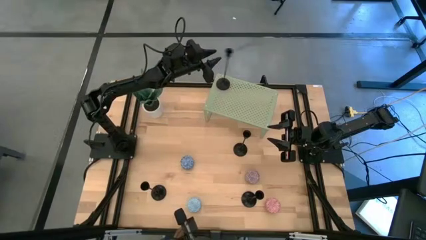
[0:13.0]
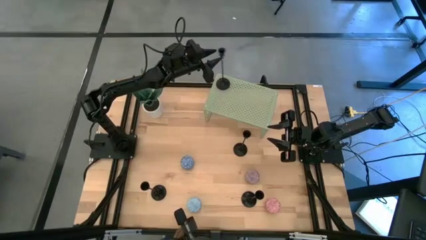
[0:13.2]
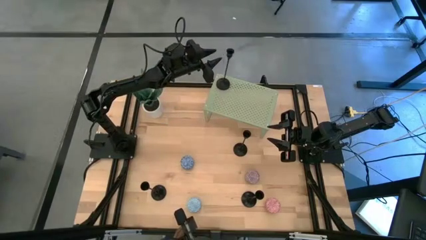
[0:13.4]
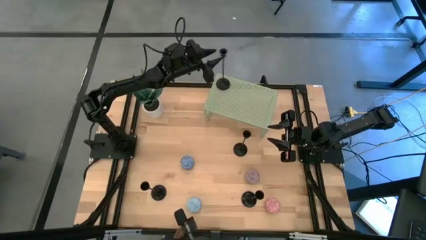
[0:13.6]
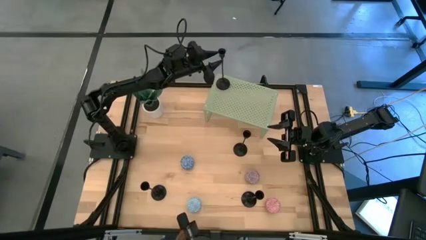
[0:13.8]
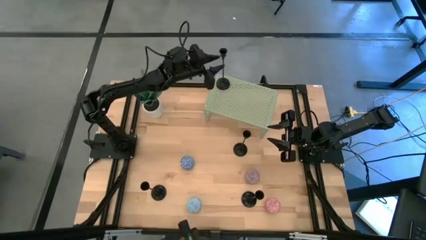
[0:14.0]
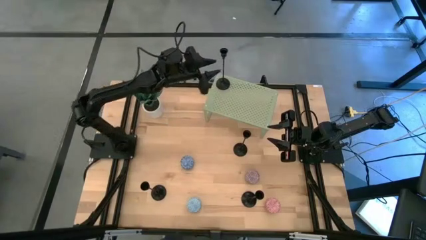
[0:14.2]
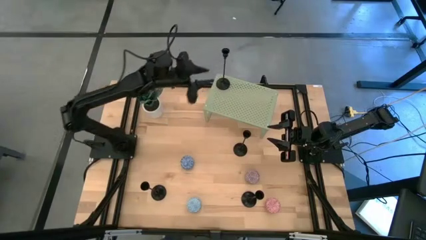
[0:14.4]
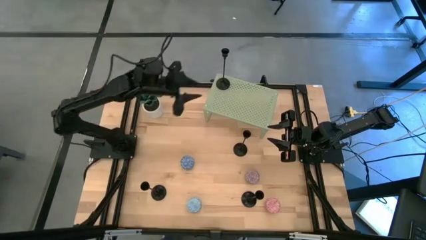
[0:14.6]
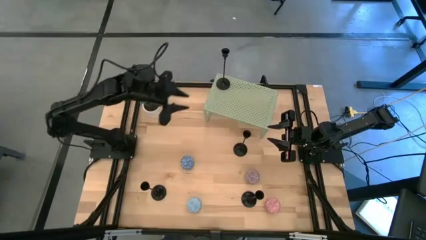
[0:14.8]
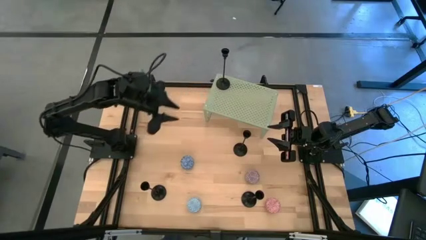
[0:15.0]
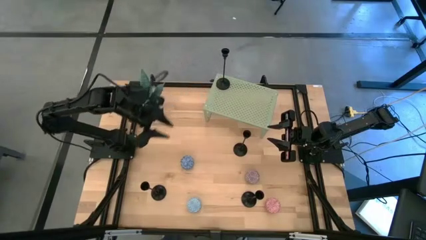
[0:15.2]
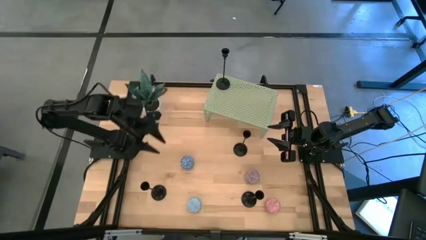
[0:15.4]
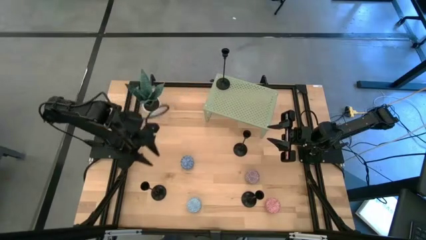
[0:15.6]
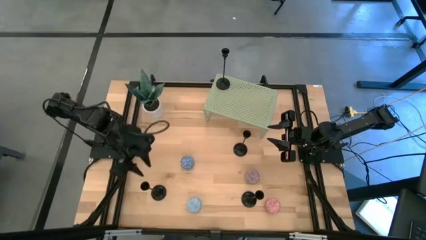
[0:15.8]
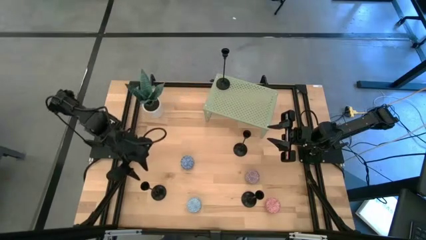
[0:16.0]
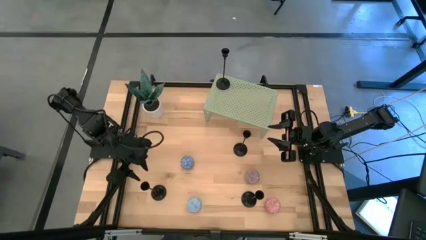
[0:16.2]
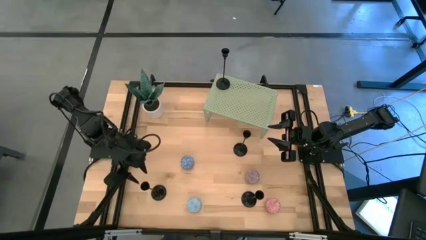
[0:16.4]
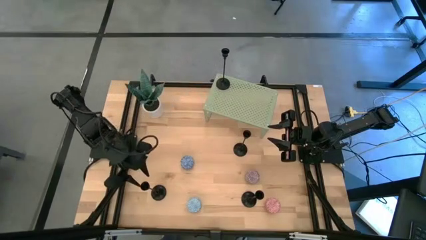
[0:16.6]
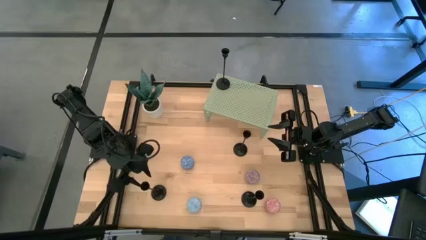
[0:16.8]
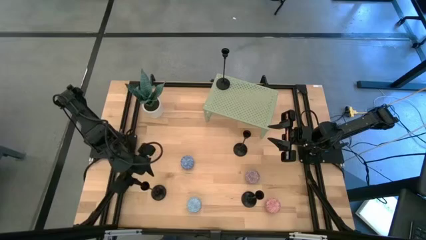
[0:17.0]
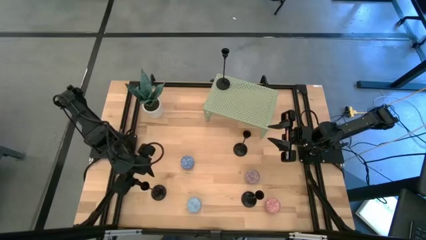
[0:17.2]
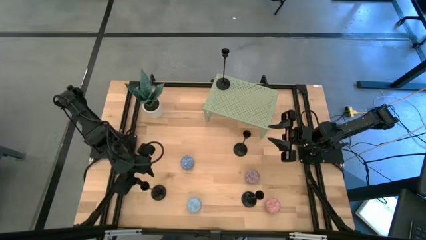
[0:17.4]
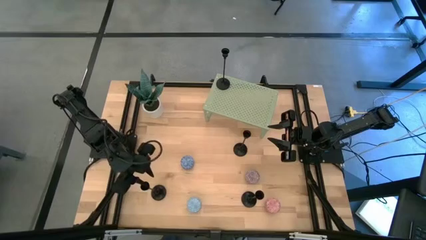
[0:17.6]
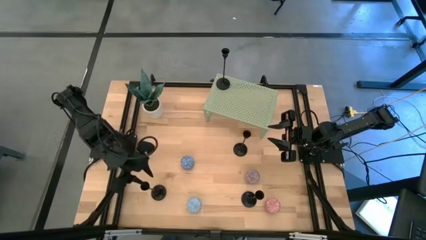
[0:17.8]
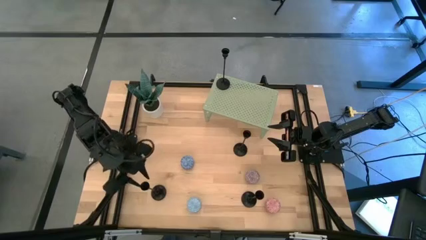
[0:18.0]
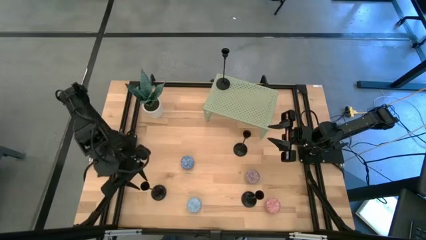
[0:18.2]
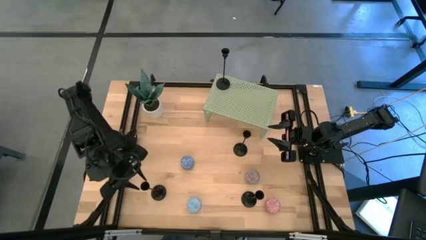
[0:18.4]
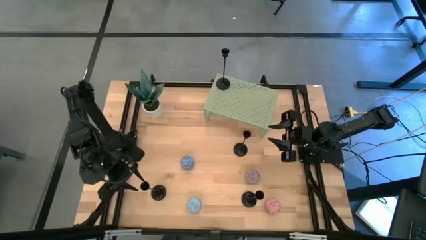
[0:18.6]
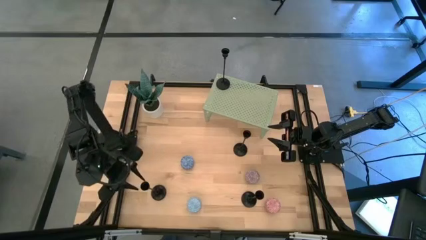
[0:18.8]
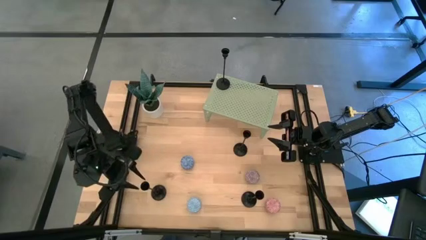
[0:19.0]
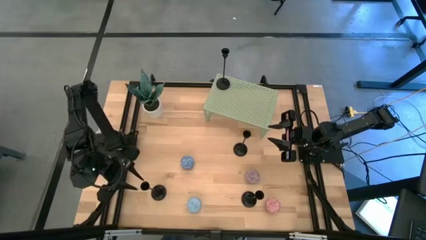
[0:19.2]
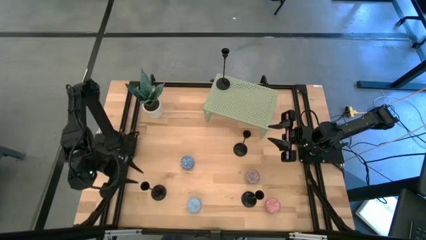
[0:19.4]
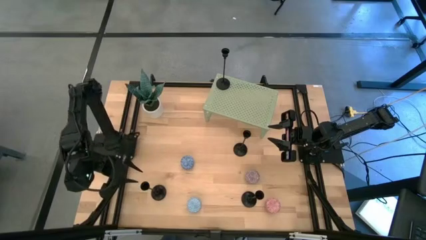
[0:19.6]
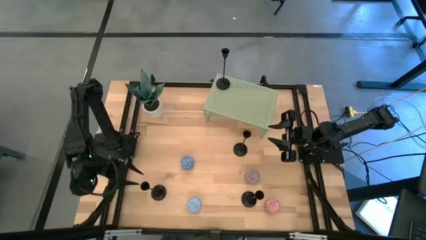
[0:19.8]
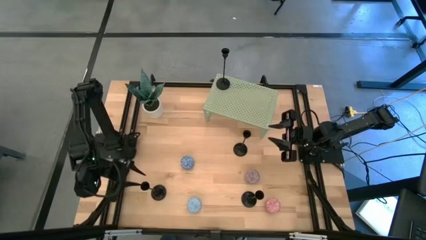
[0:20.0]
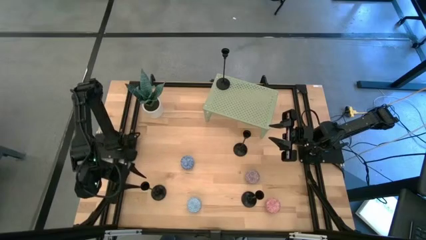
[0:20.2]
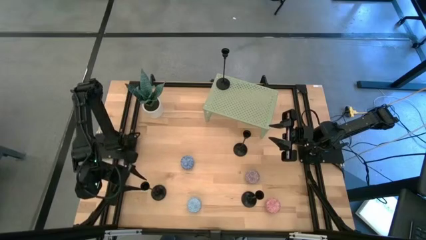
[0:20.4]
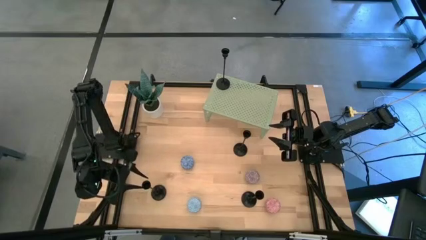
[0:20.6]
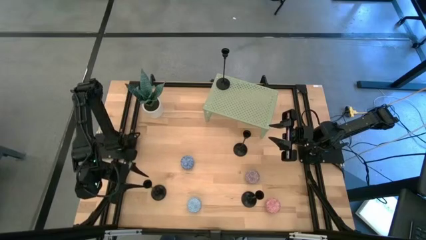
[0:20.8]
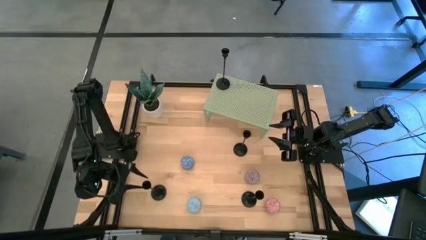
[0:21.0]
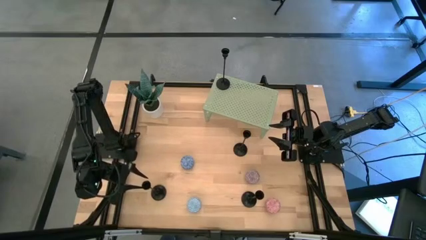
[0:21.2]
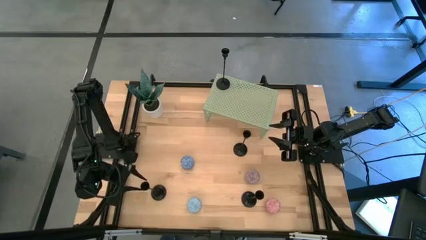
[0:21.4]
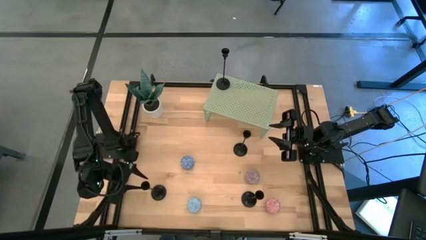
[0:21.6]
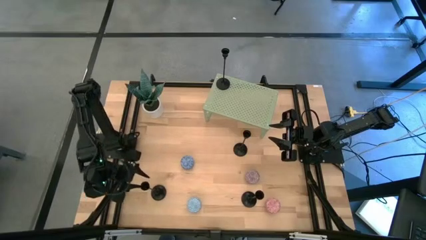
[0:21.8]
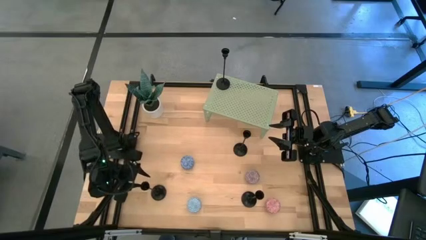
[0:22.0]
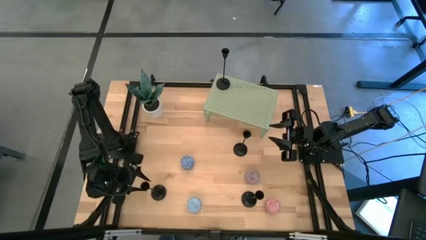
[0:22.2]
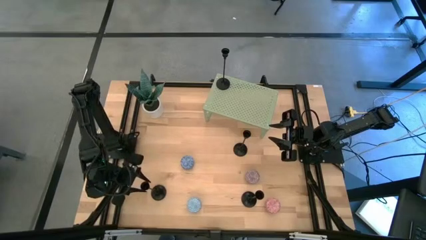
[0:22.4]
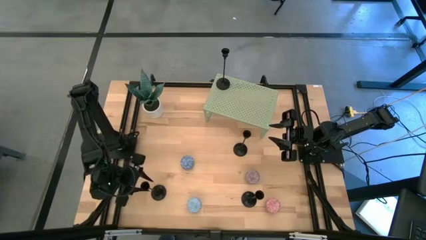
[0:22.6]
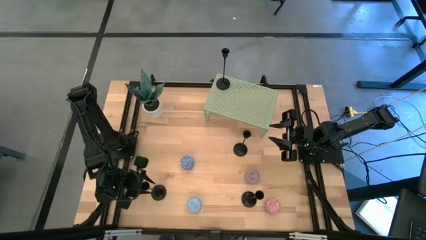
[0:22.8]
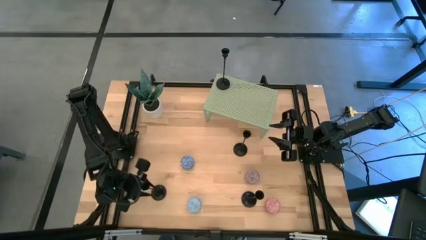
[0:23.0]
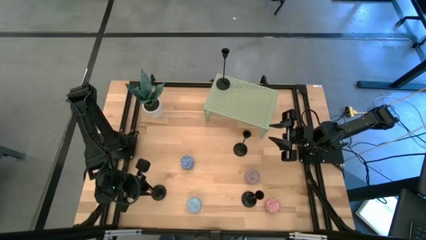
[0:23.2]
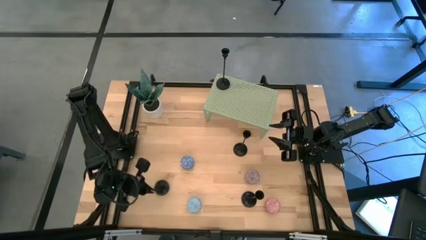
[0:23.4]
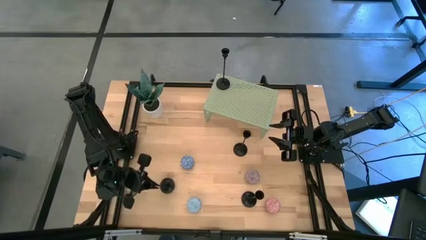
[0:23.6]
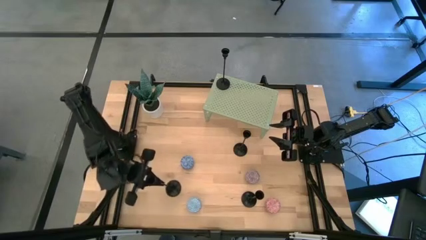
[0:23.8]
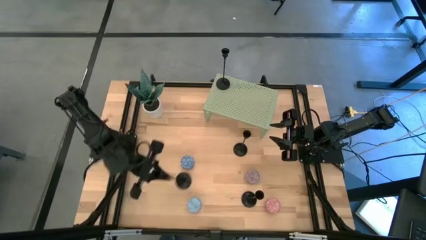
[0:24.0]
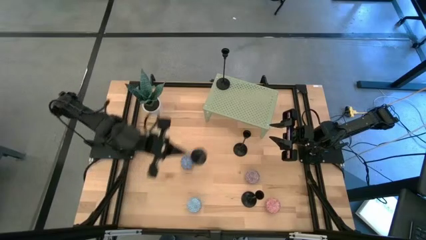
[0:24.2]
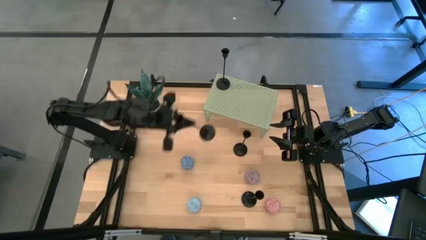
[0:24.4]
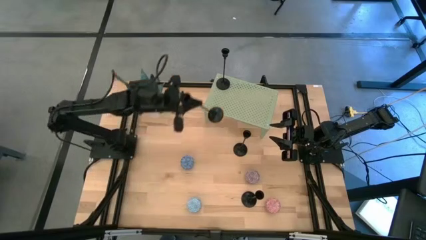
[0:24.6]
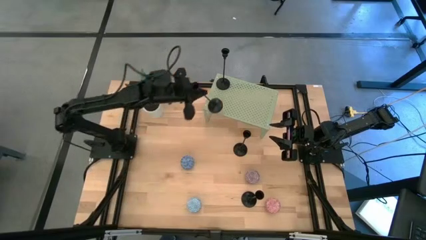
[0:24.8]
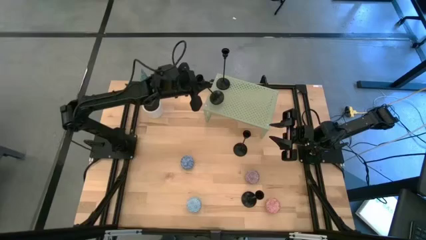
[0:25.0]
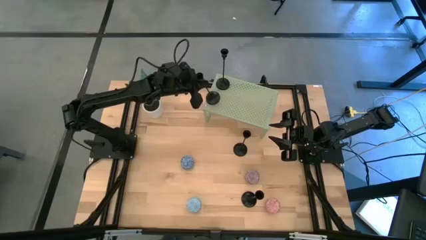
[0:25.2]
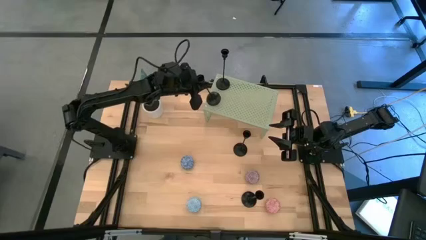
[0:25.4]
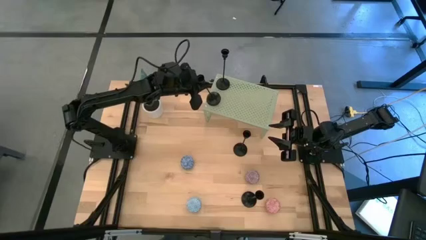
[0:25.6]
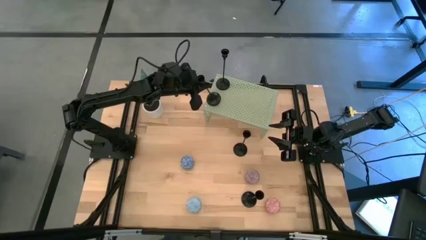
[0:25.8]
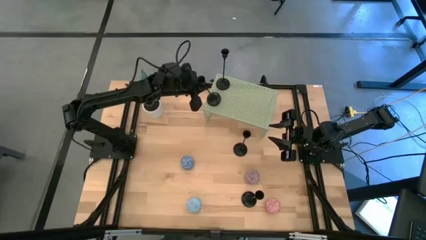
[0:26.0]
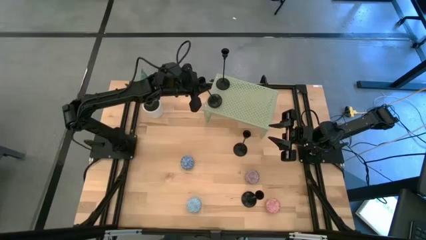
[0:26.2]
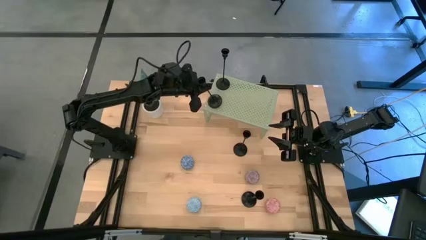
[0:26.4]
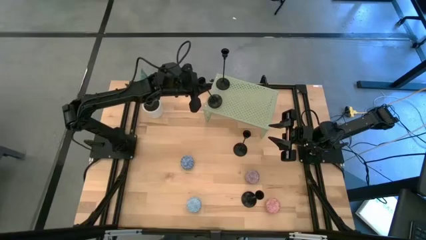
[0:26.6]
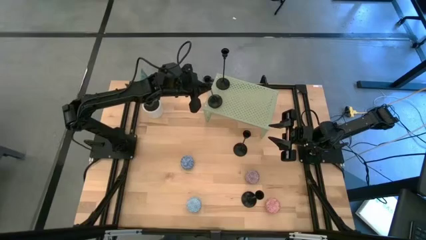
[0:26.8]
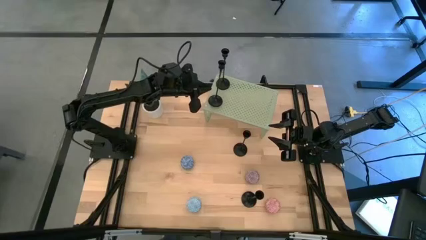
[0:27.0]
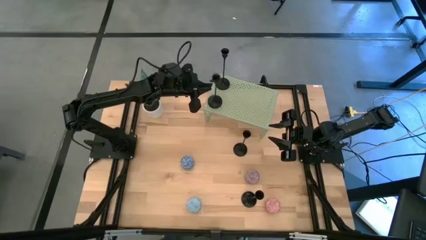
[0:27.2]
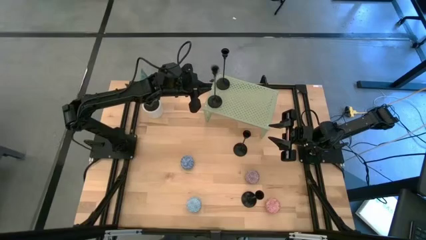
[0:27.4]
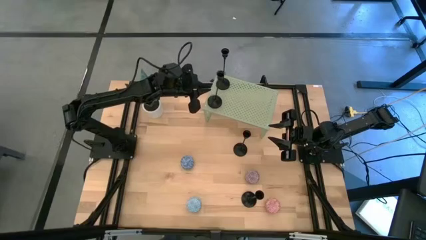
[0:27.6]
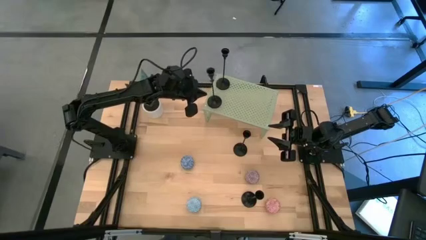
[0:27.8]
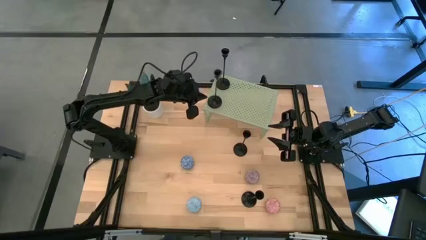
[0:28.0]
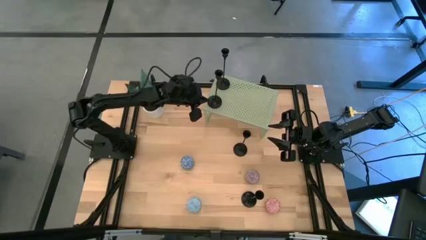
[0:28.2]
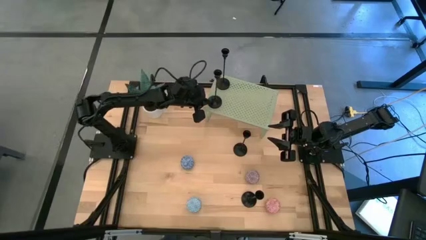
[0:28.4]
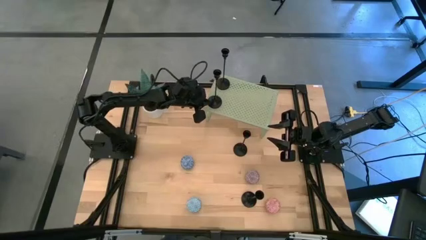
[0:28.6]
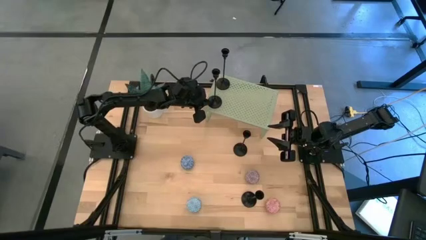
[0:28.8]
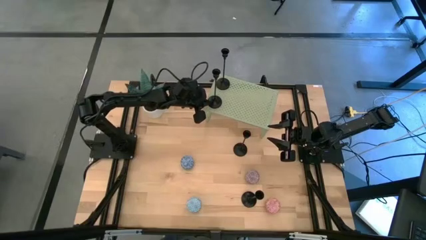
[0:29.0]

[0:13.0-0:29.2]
Task: Pick & Place candle stick holders
Put the black candle holder on the shelf
